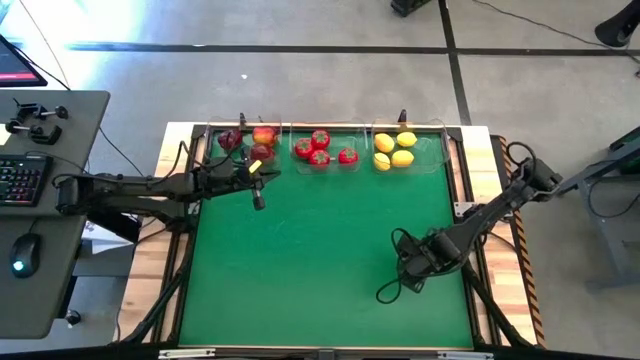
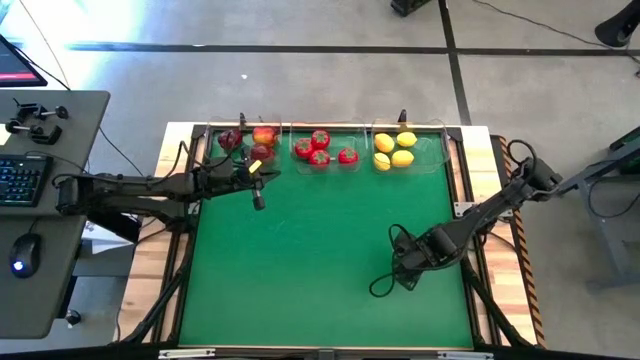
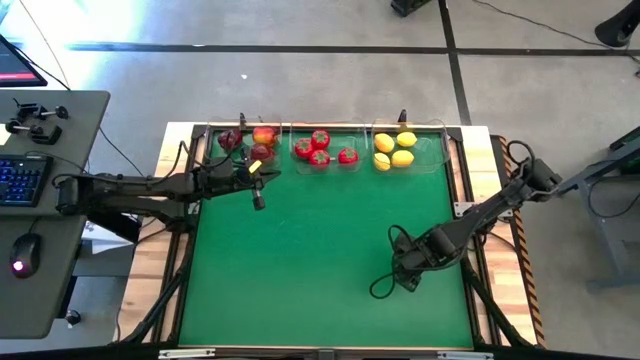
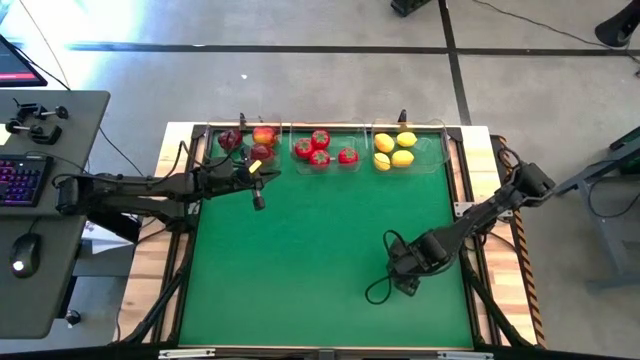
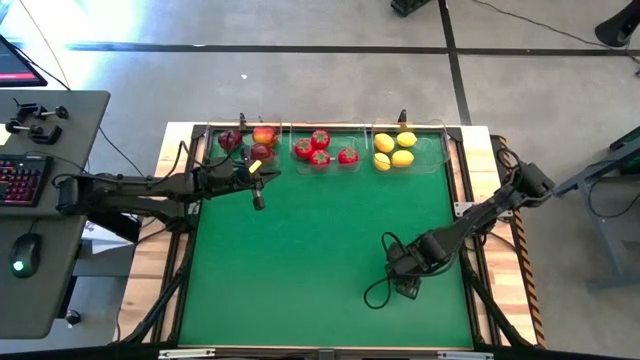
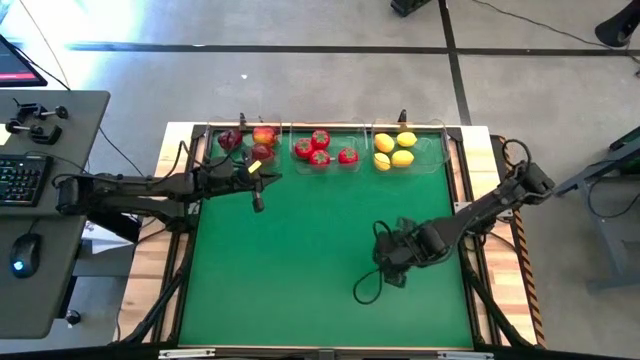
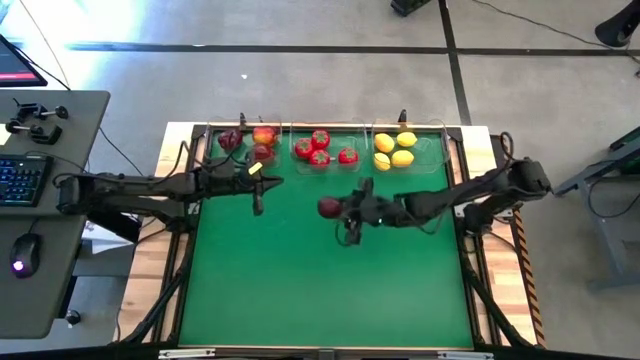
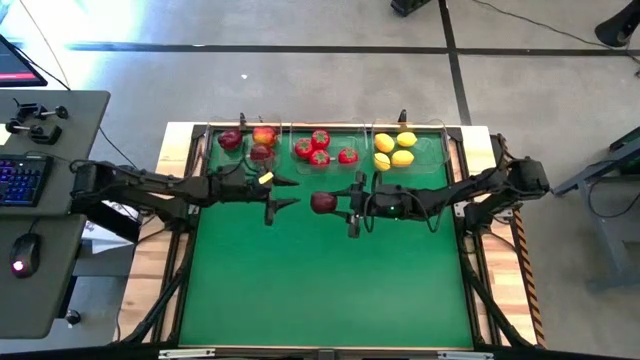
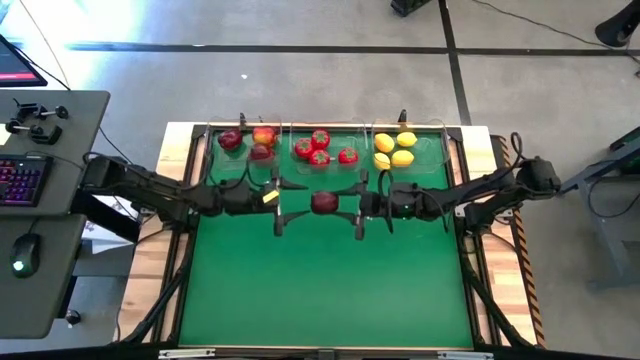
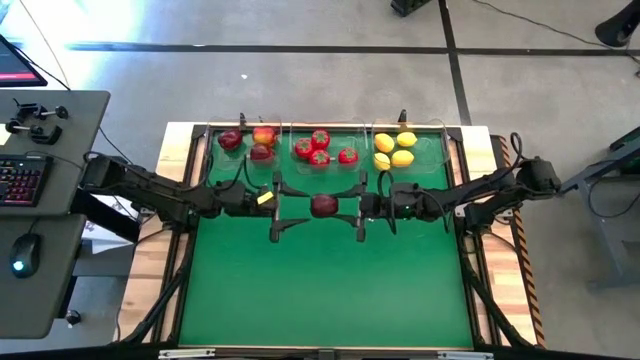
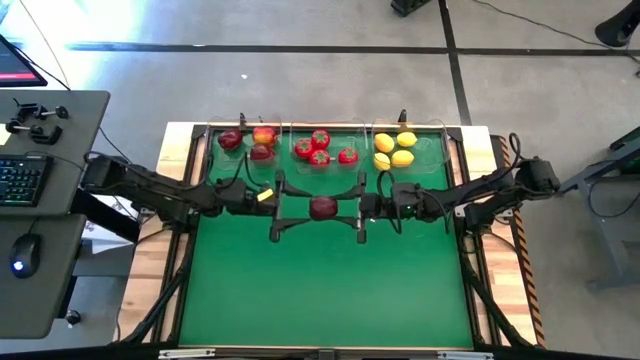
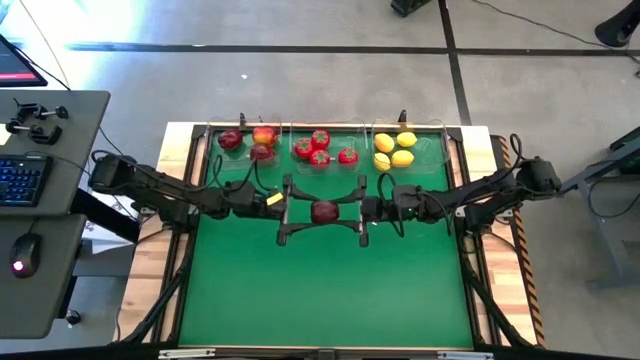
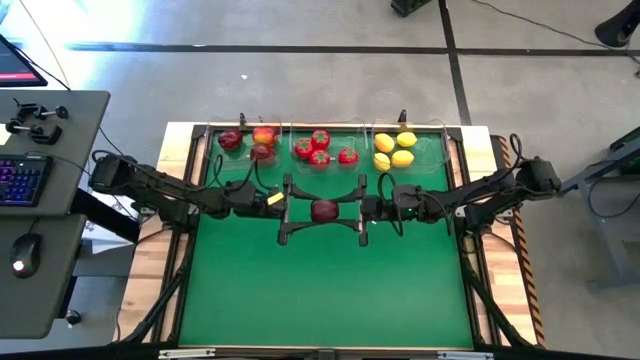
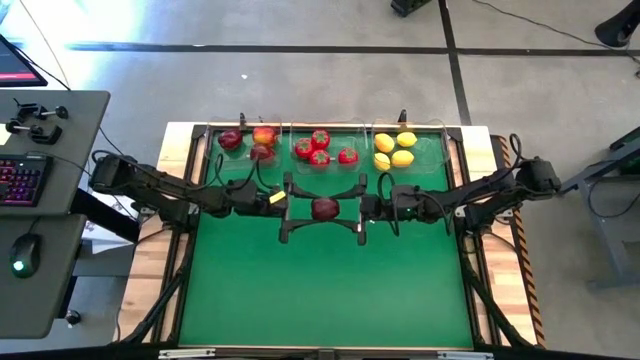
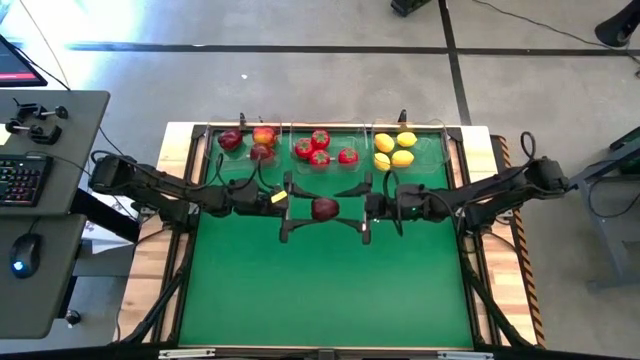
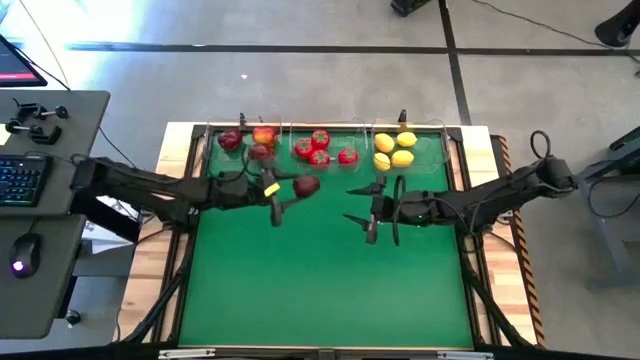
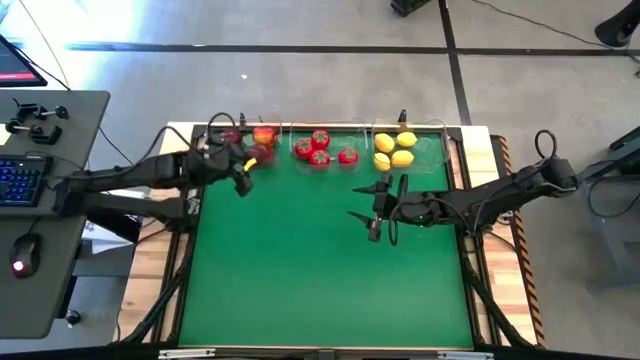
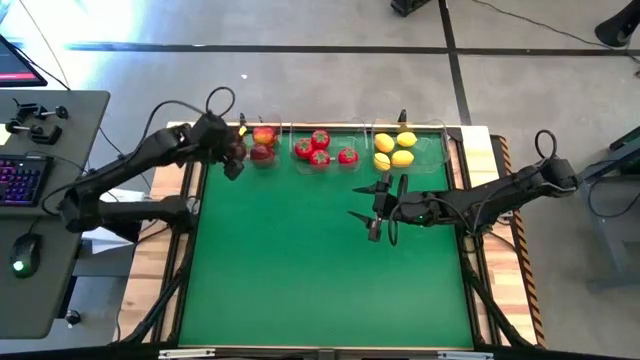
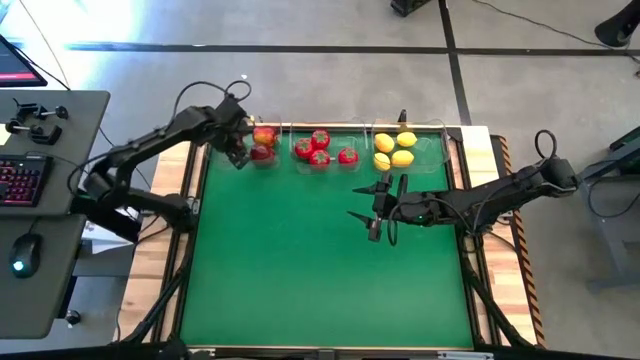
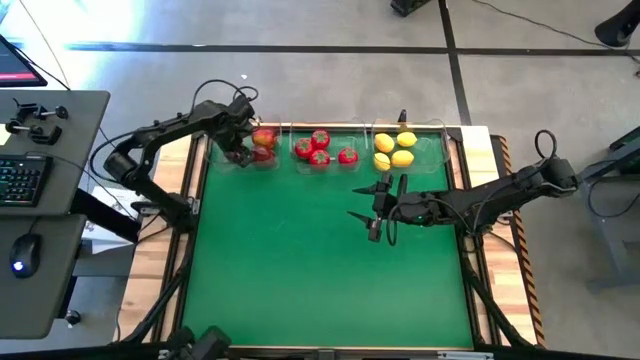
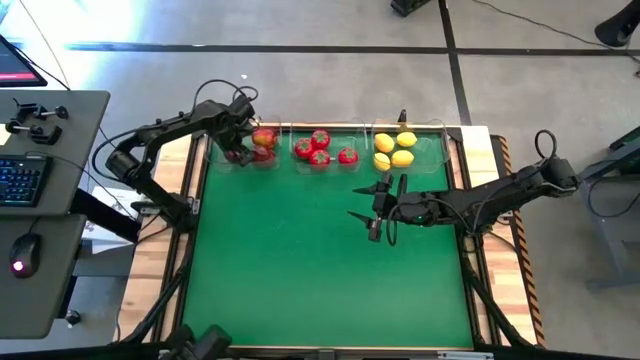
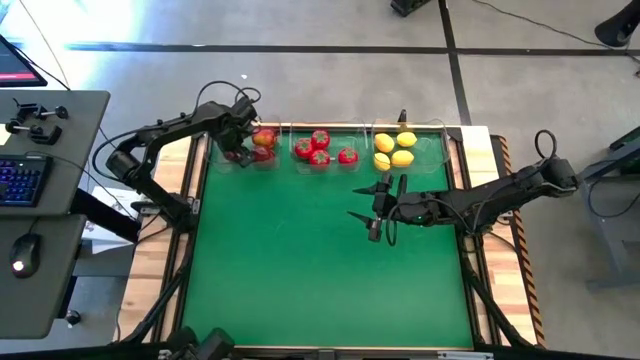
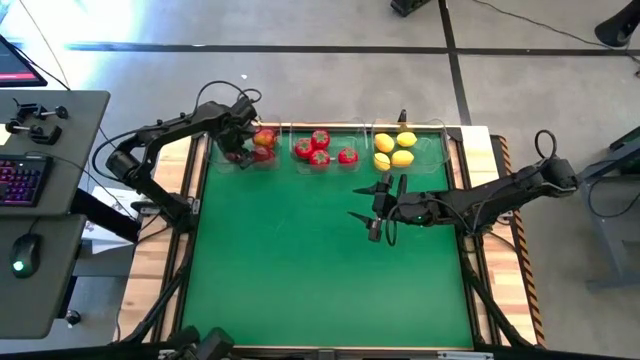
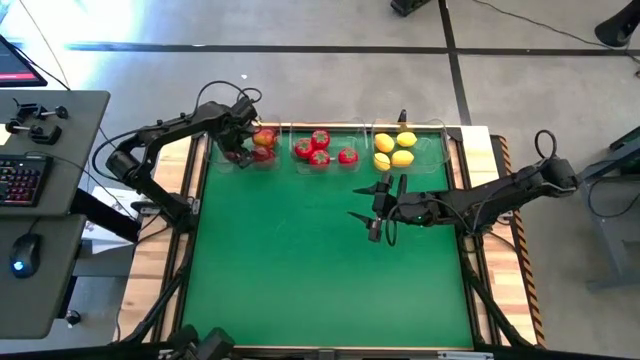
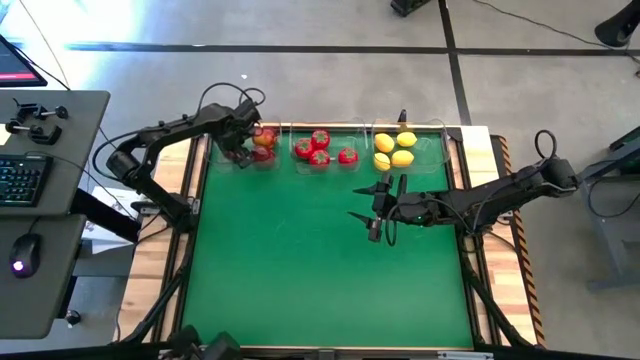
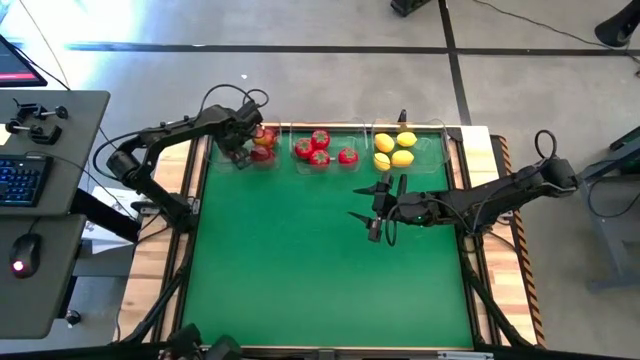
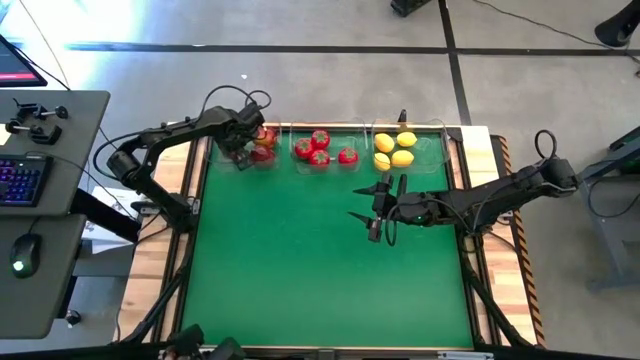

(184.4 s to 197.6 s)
Task: Sort produce into baskets
Put the apple into the left transparent bin

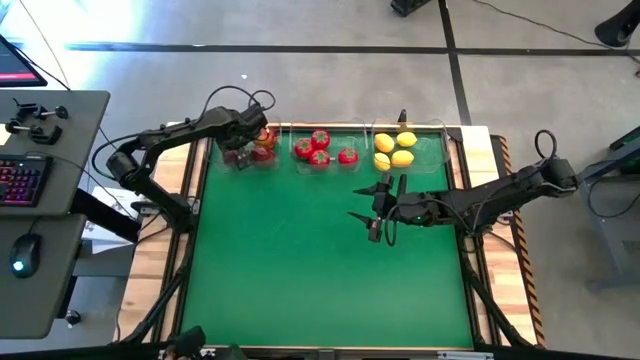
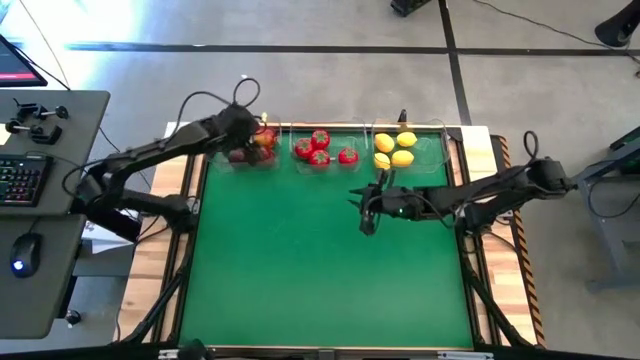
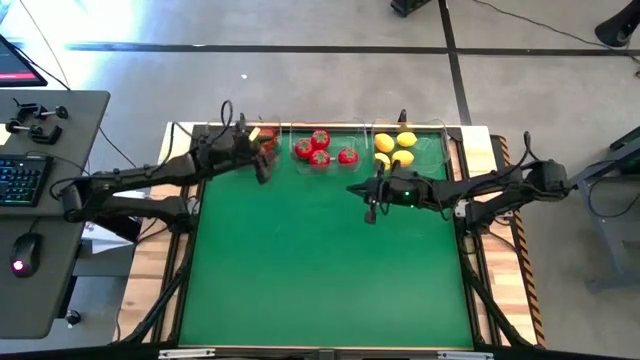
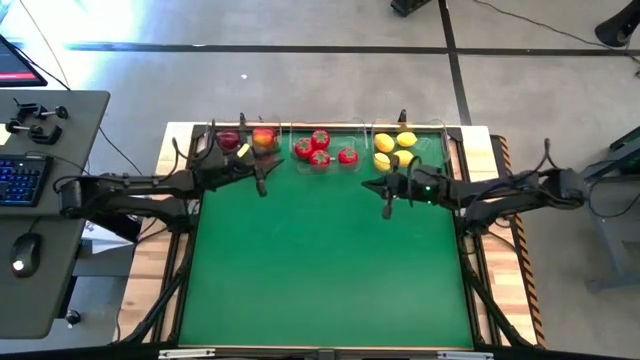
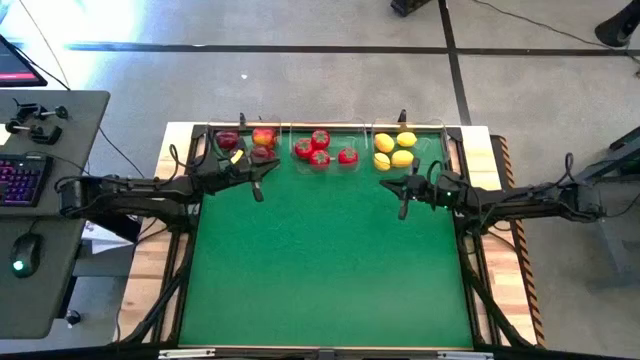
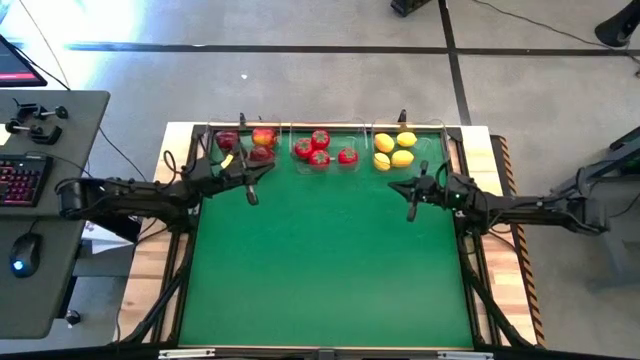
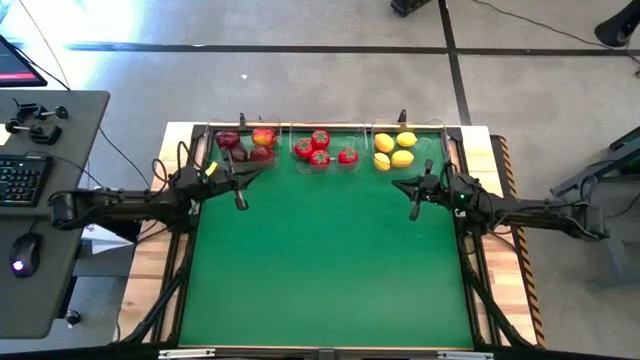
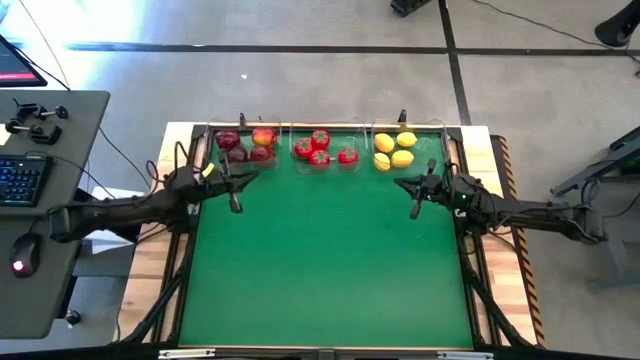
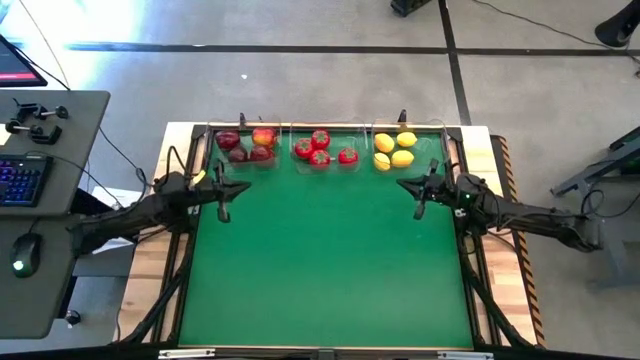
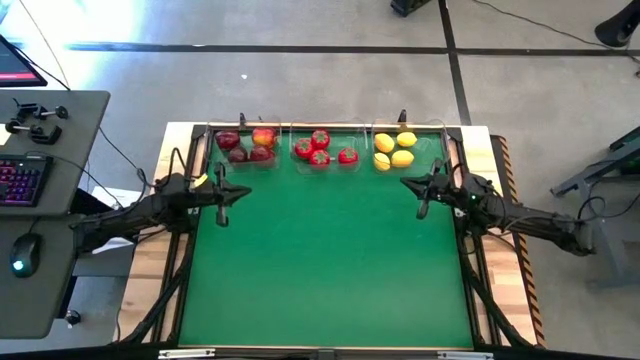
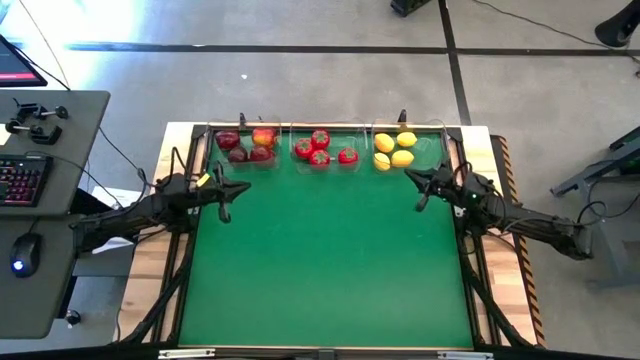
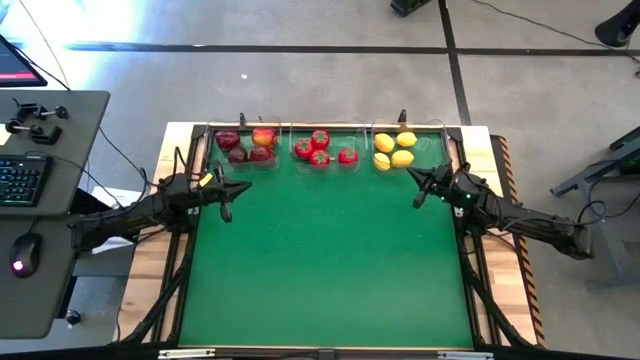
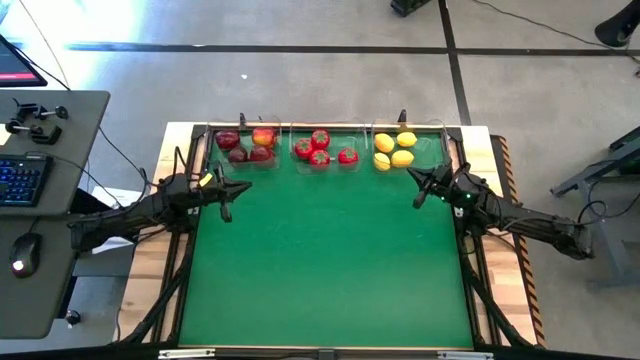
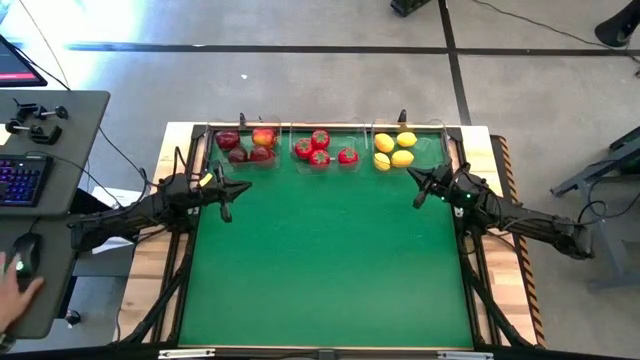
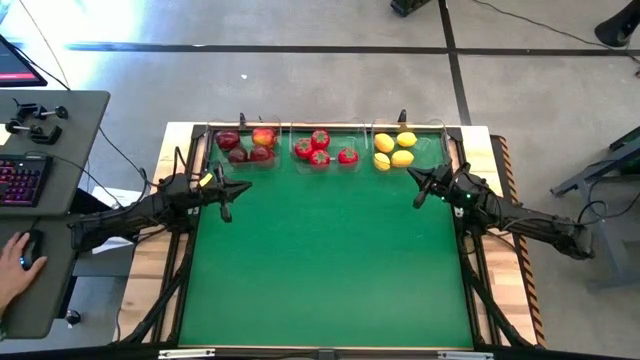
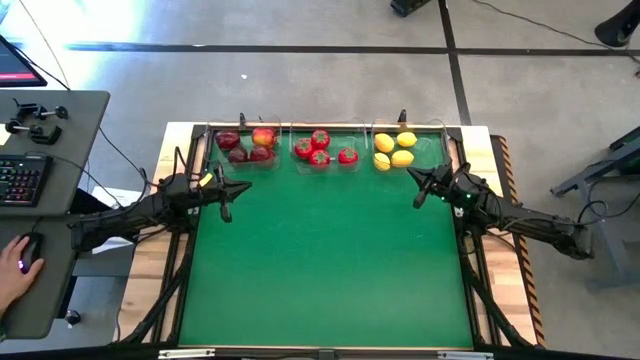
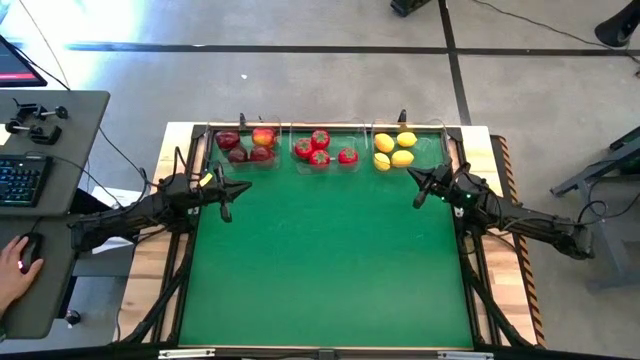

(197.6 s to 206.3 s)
Return to Home Position
